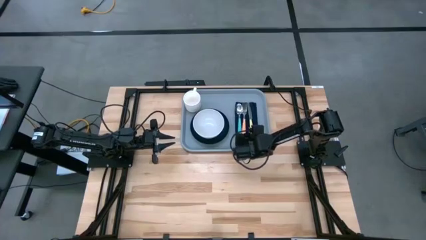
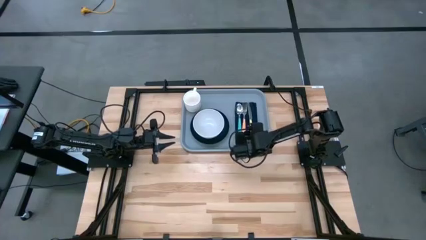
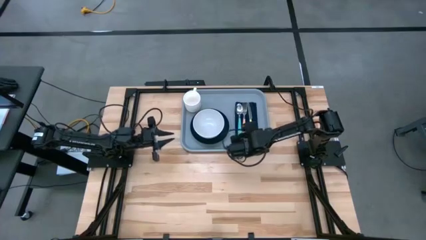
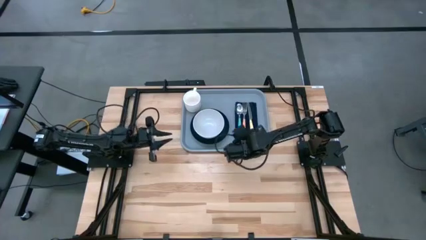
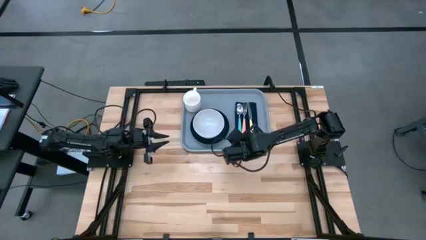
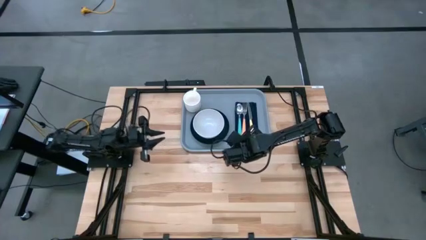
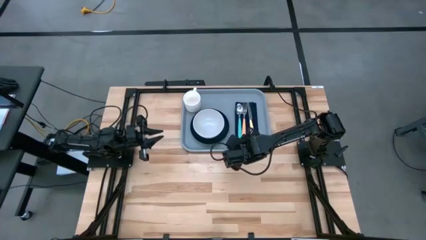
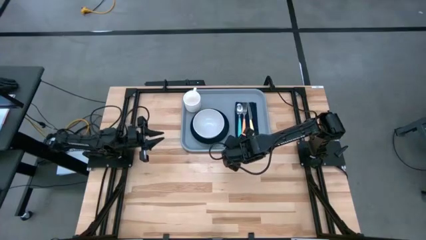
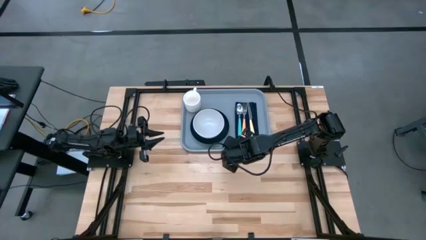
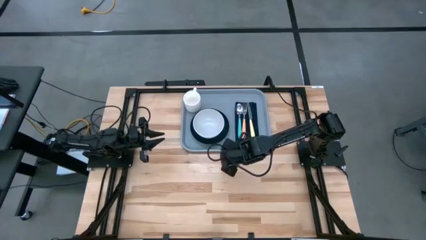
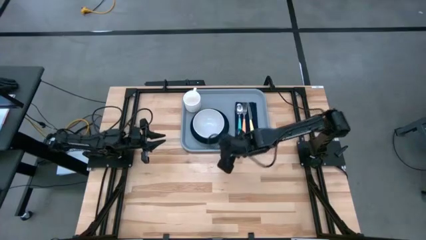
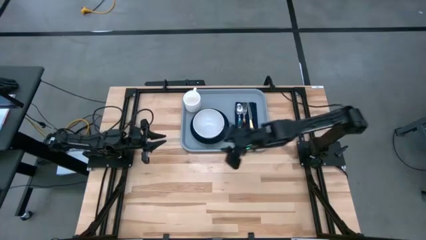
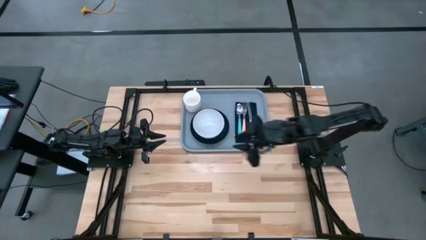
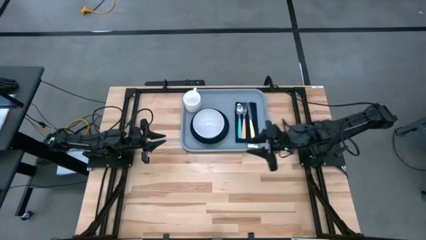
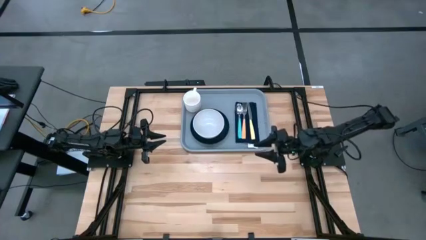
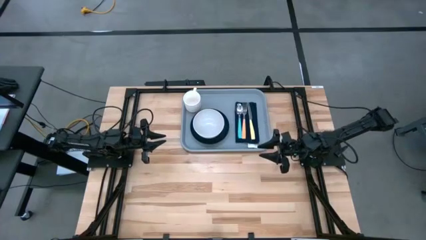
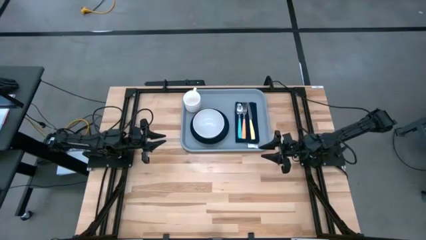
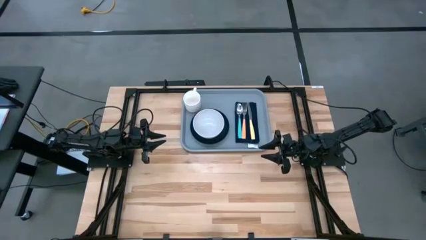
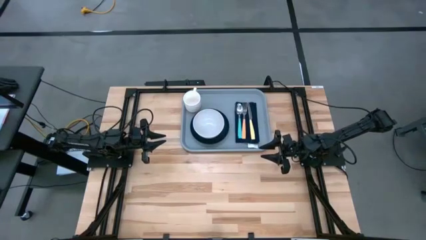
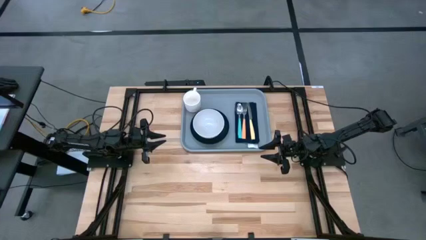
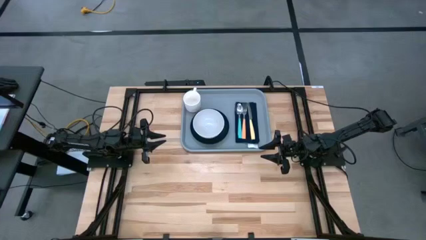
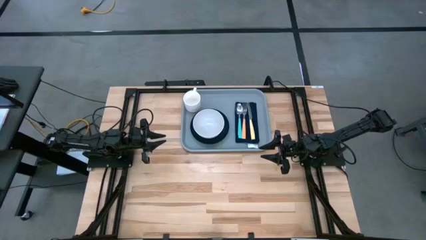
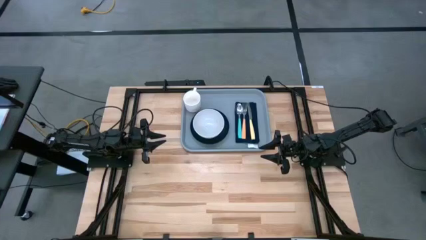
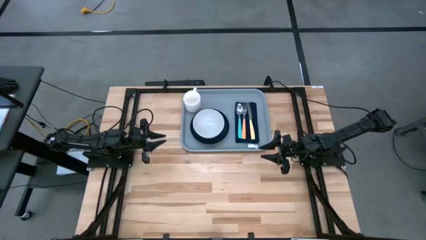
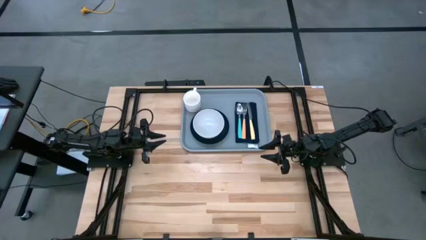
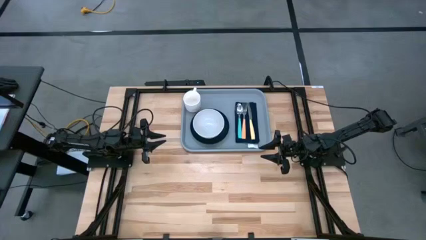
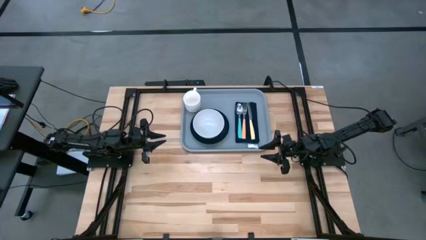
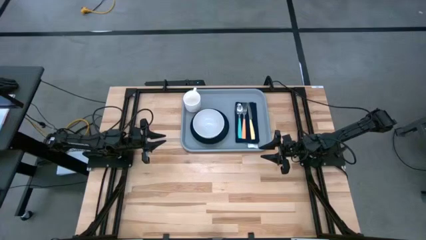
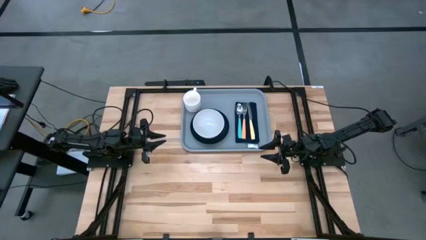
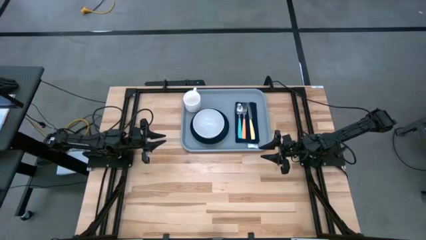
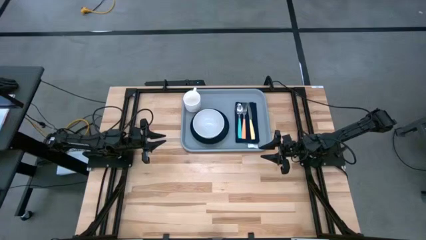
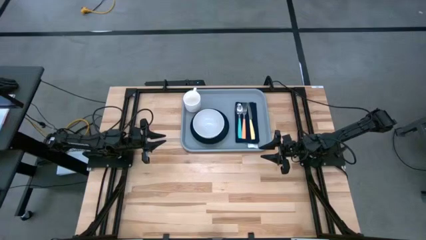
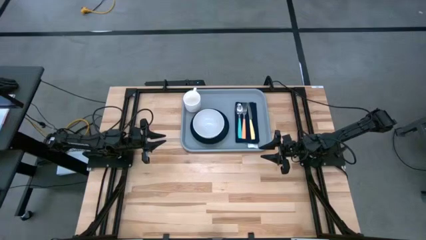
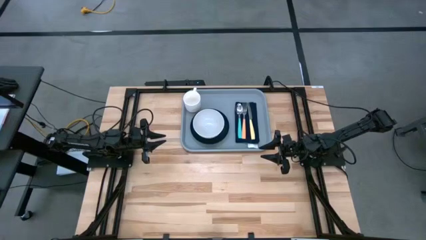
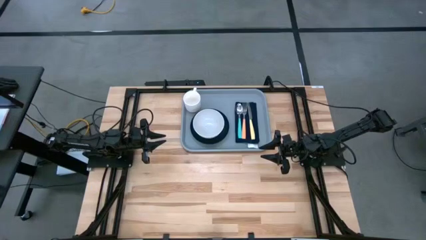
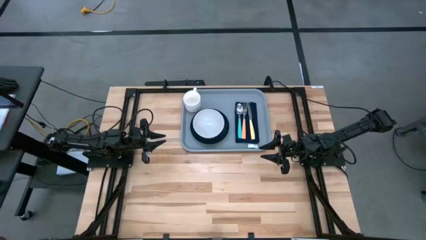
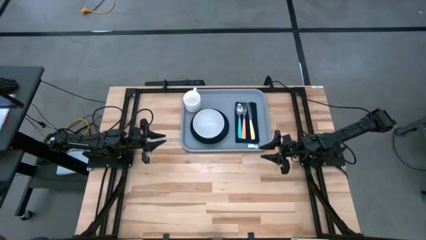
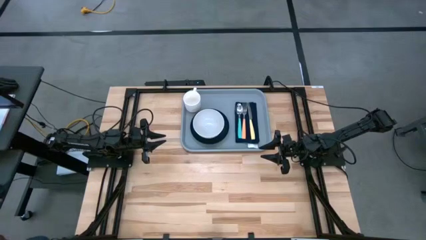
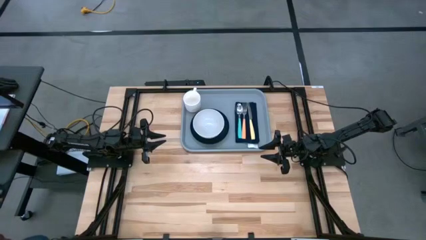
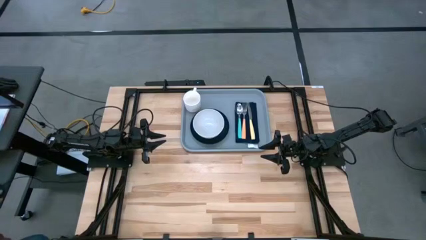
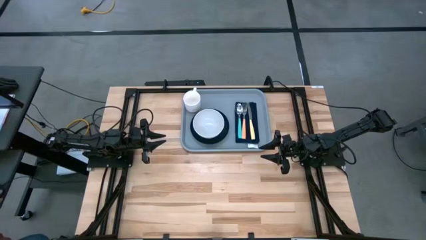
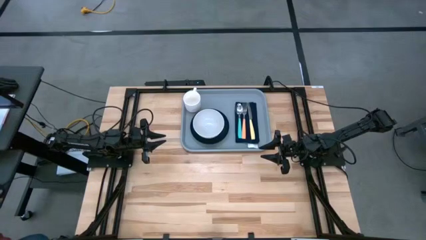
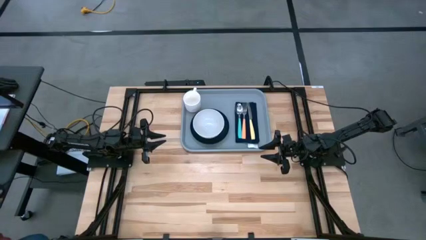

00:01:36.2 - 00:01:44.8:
Task: Set up tray
Return to Home Position

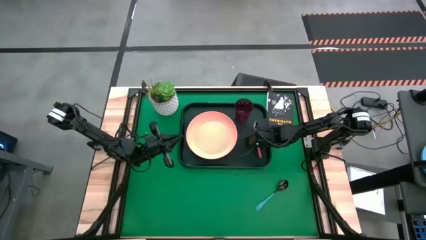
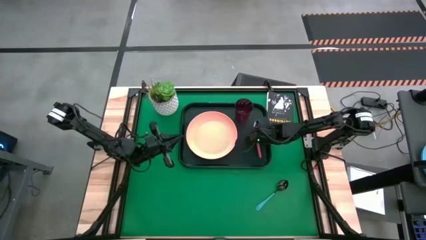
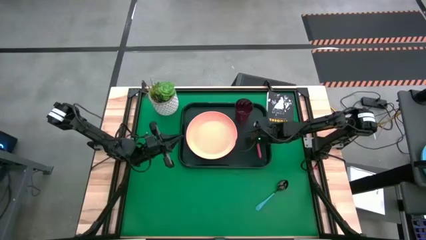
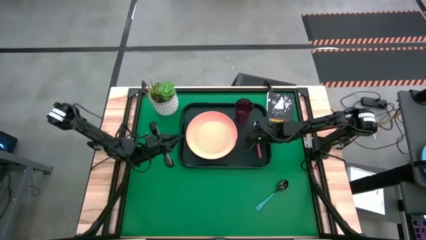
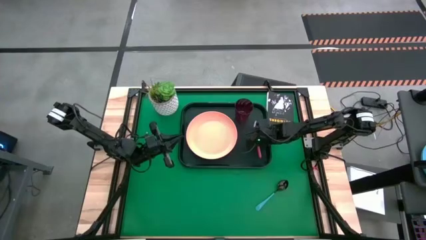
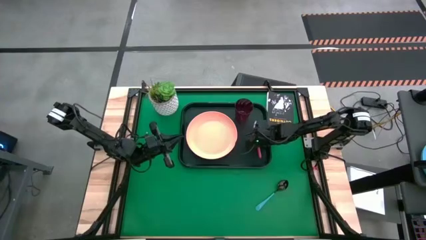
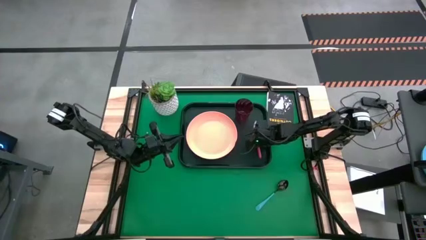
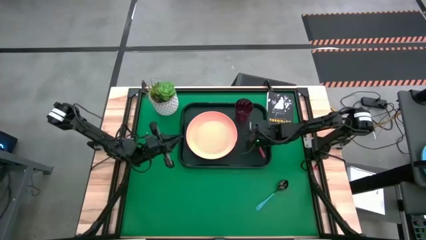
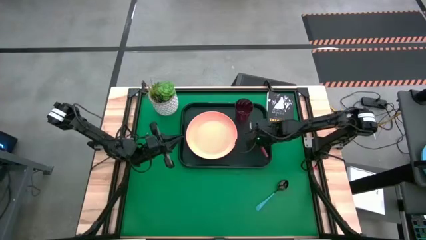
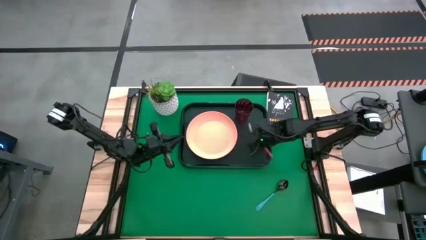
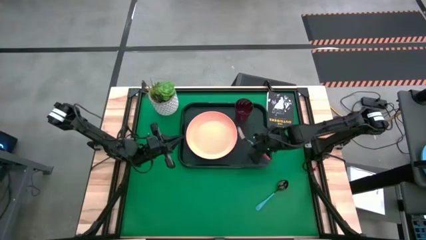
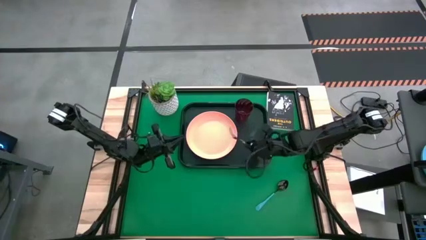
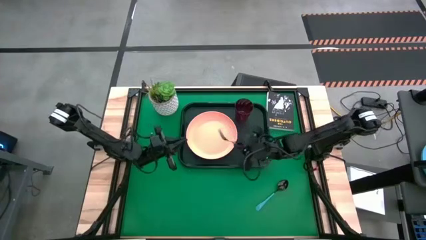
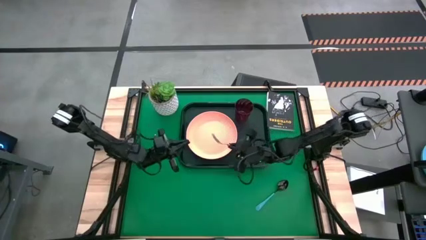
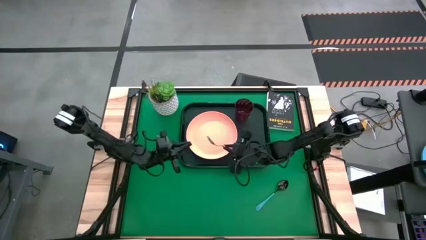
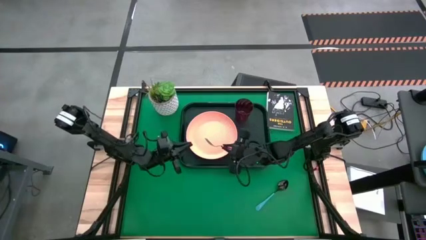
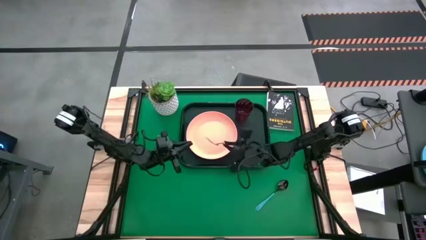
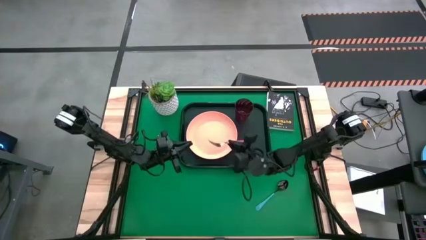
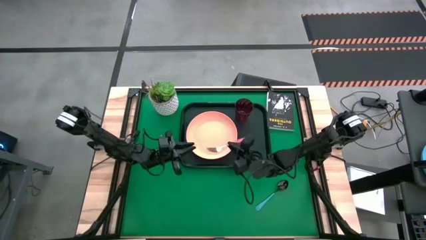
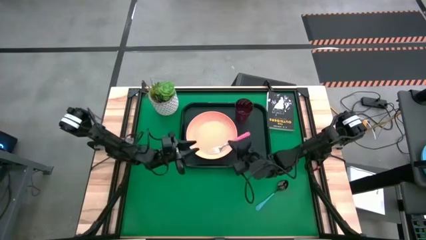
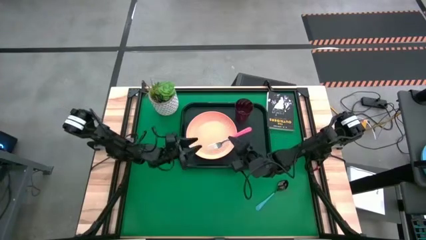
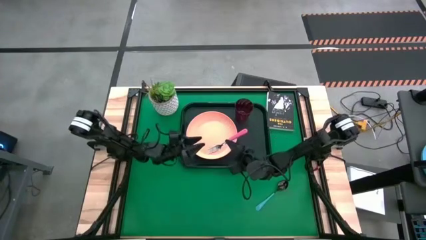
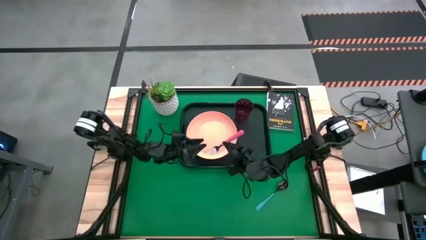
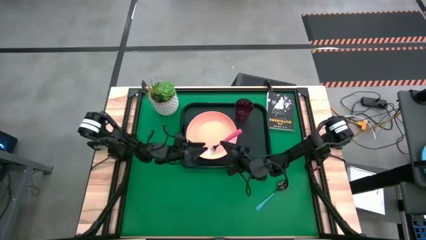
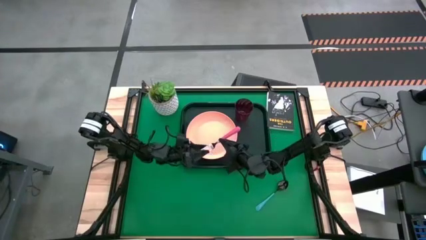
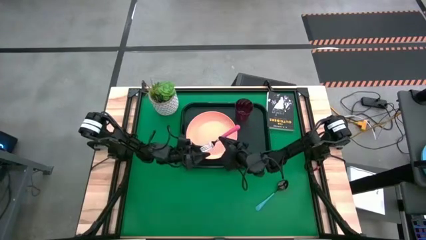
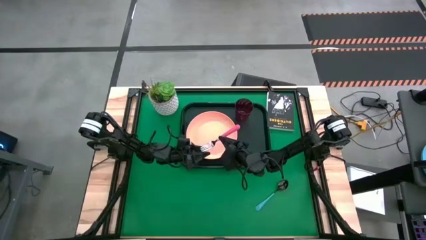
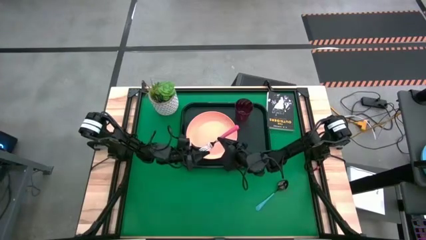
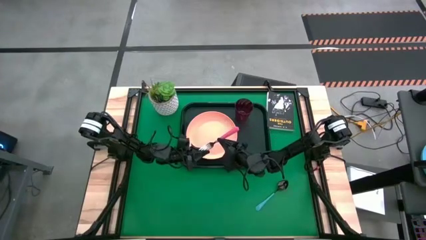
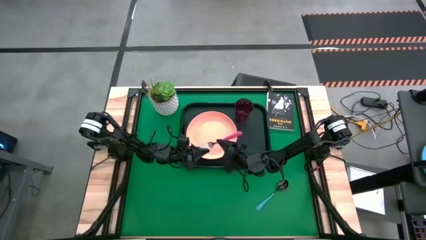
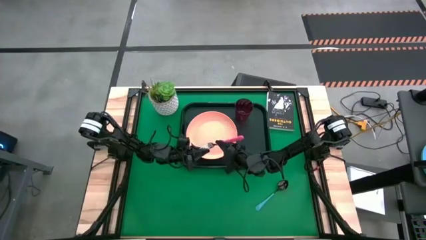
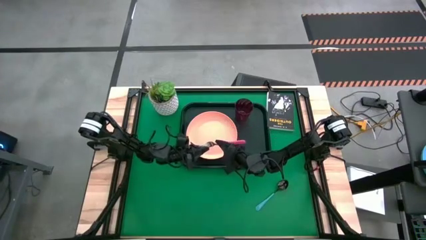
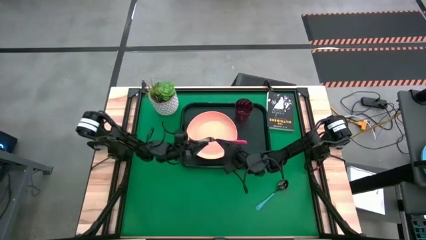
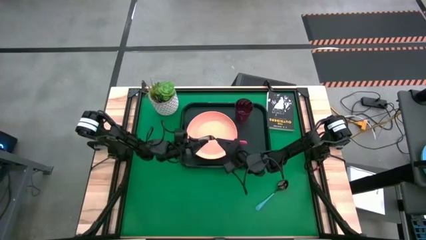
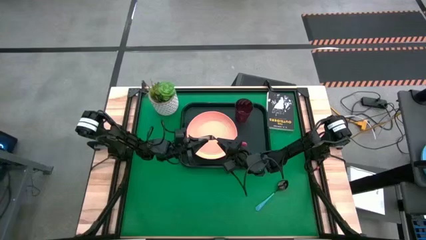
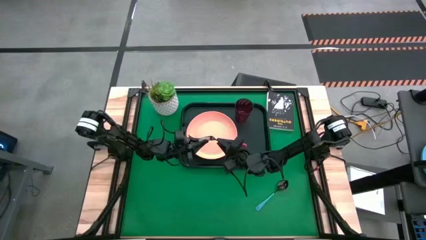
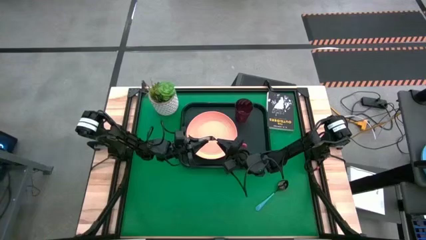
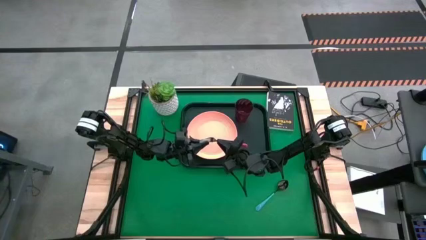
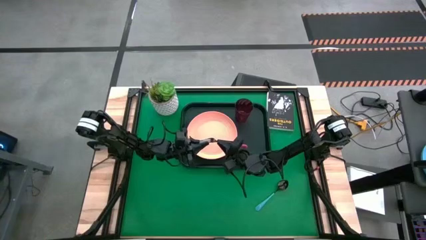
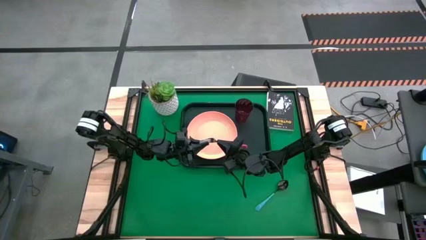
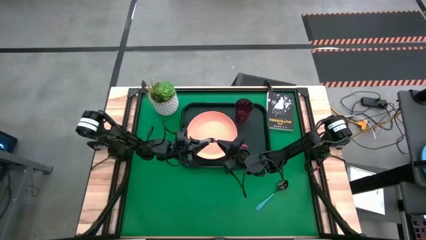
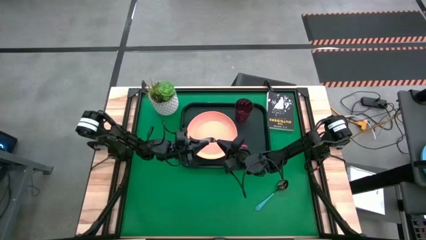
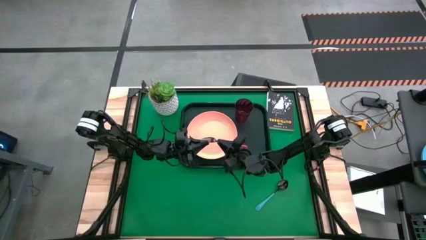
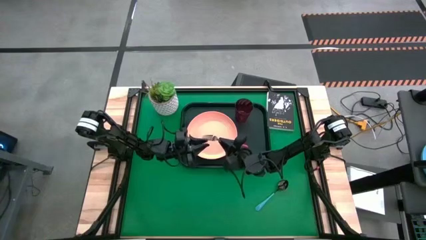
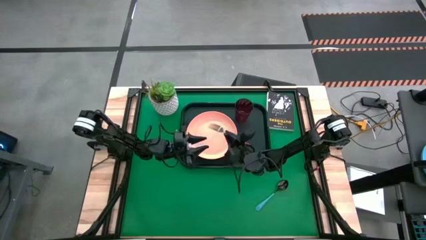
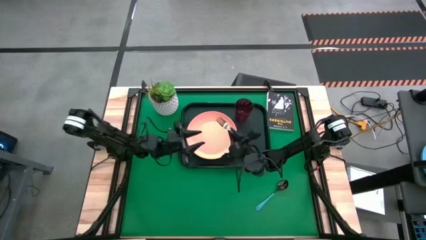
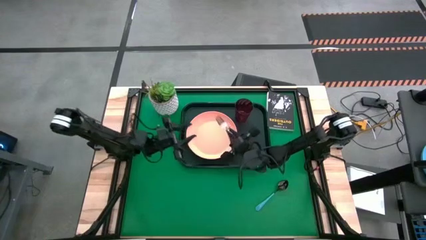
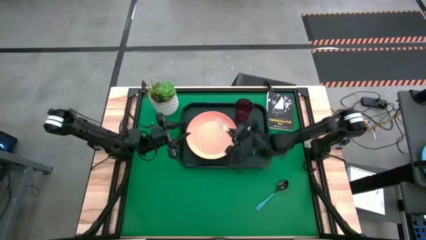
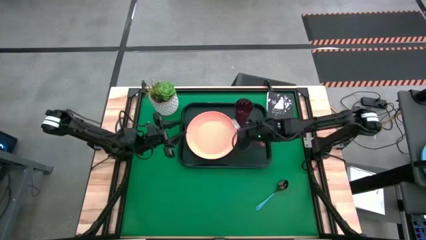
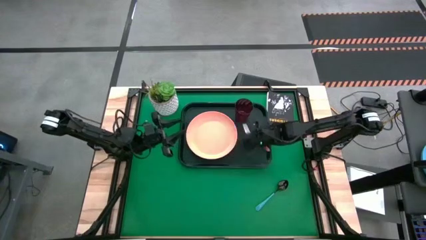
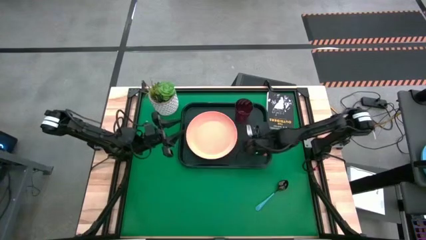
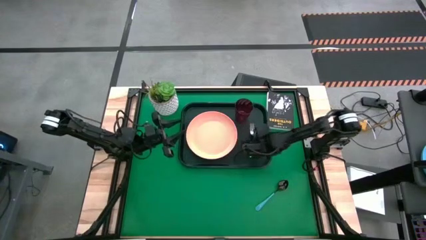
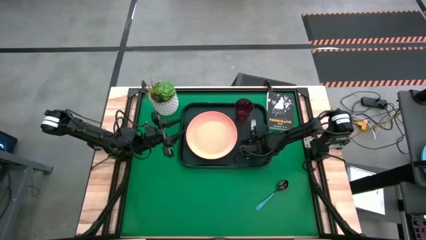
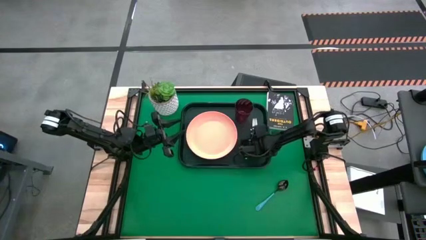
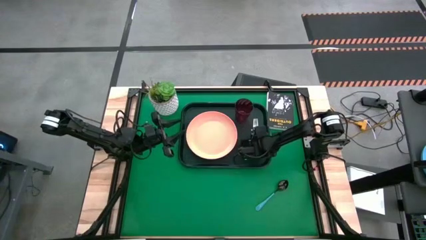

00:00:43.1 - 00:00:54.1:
Task: Pick and place plate/cup/fork/spoon on tray
Put the pink fork on the dark green serving tray to the right of the orange plate
